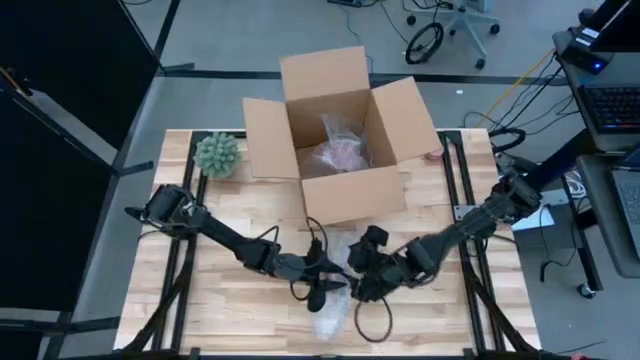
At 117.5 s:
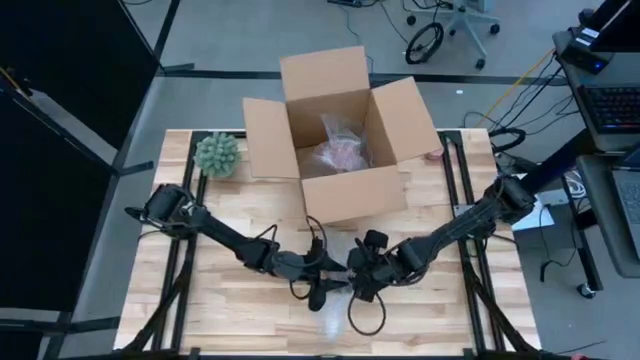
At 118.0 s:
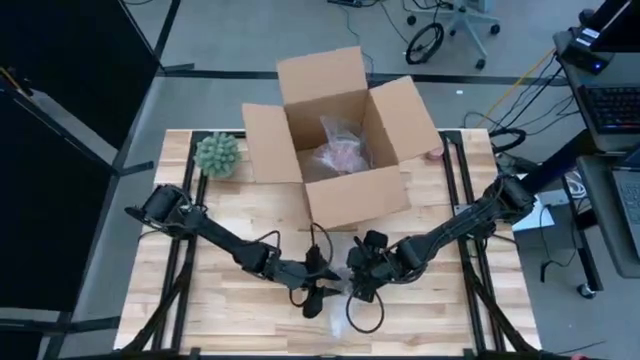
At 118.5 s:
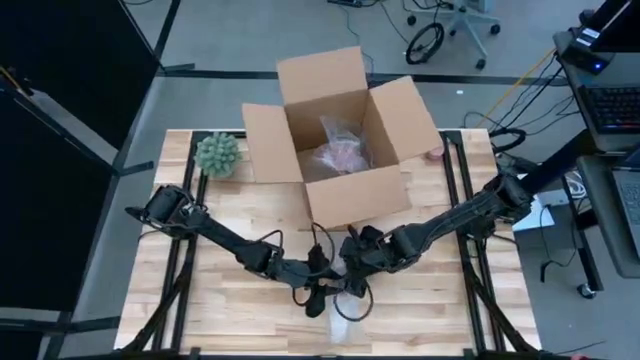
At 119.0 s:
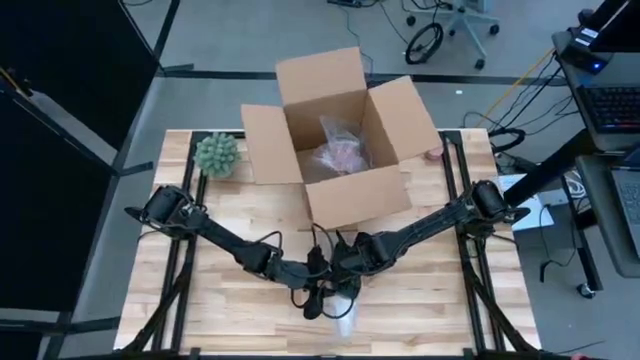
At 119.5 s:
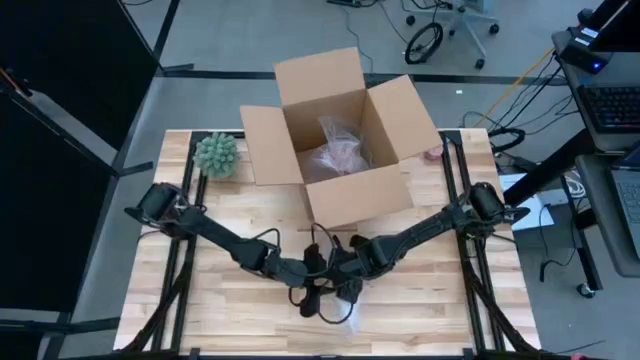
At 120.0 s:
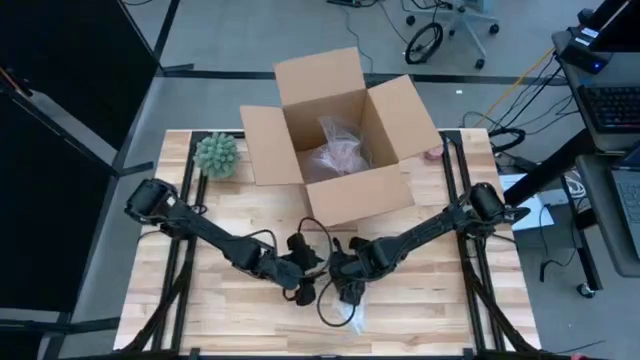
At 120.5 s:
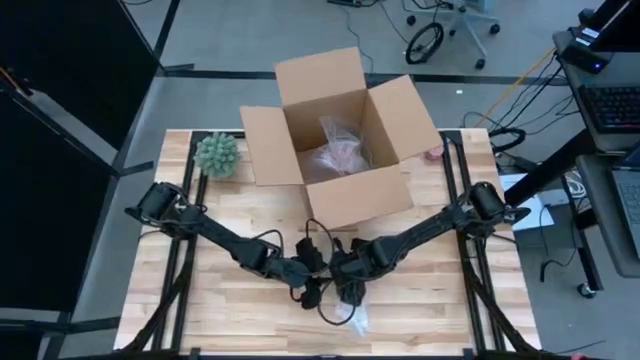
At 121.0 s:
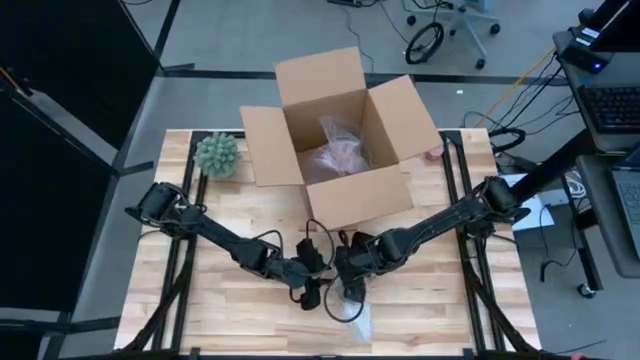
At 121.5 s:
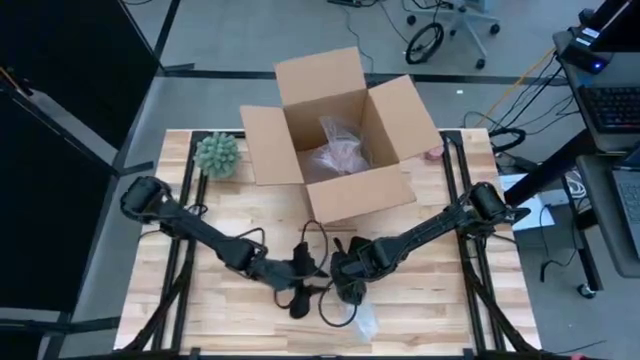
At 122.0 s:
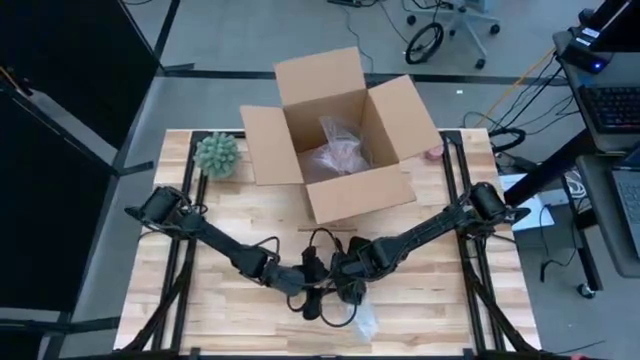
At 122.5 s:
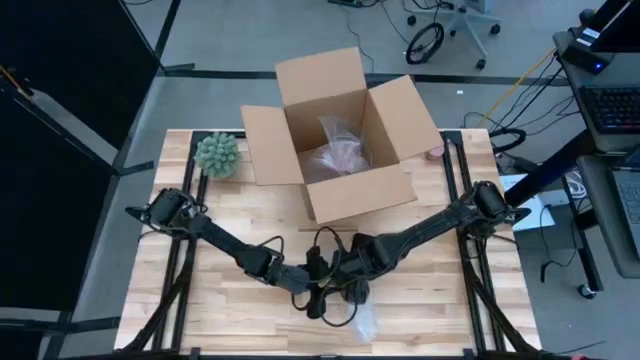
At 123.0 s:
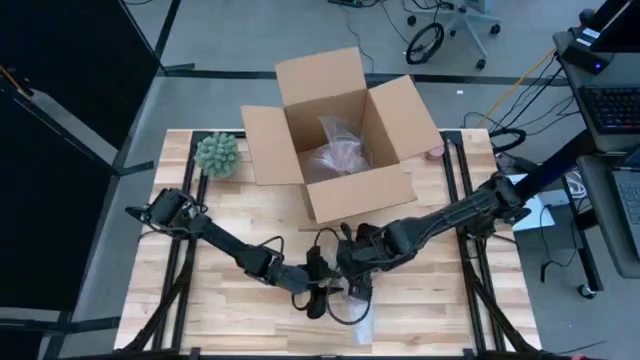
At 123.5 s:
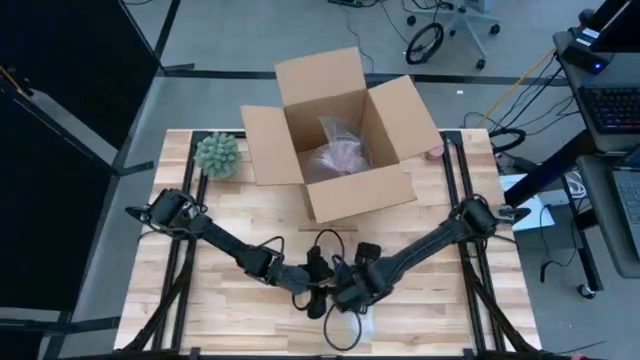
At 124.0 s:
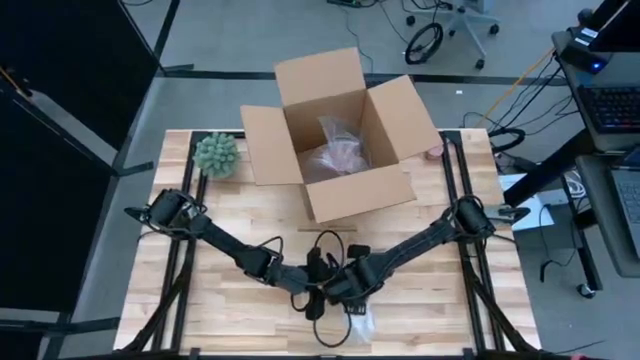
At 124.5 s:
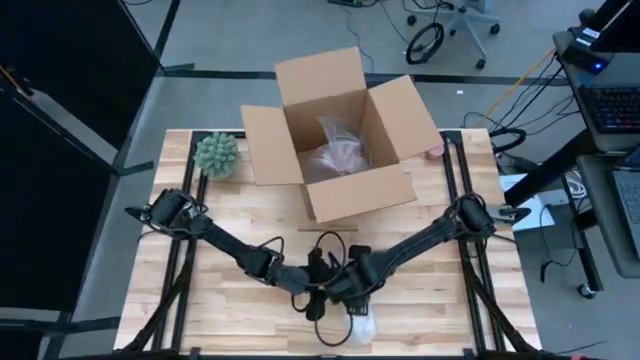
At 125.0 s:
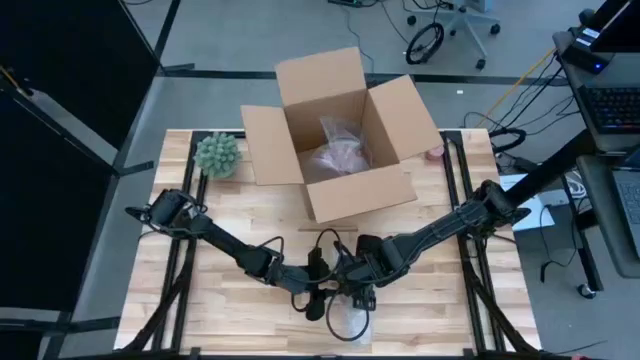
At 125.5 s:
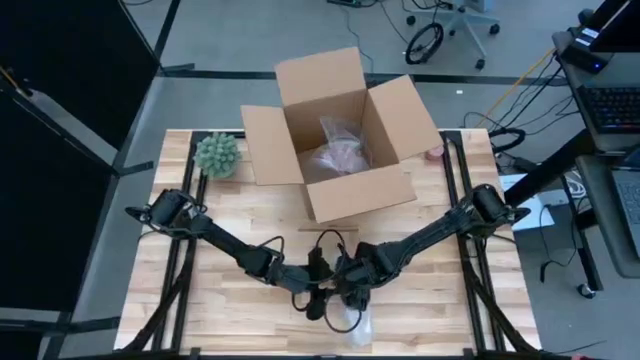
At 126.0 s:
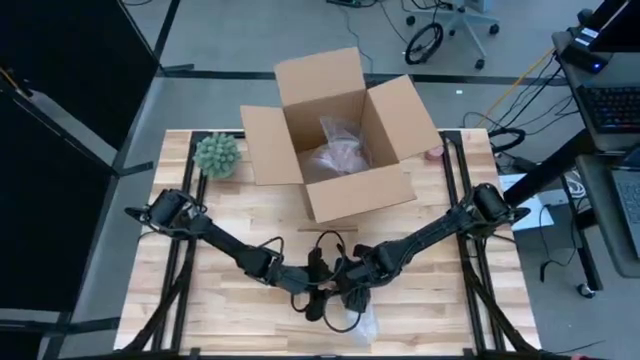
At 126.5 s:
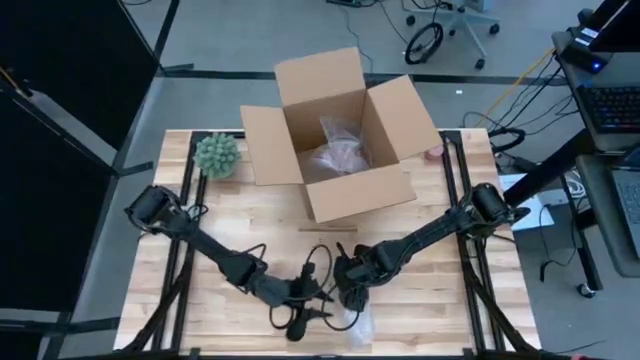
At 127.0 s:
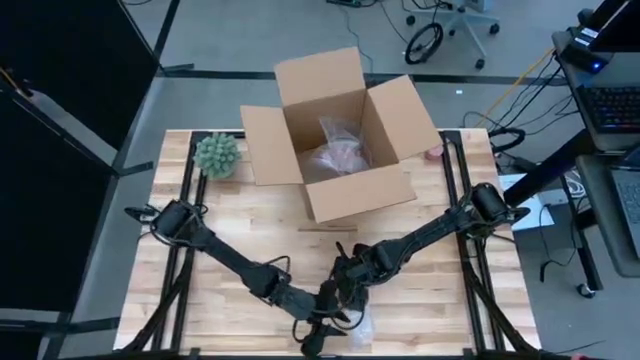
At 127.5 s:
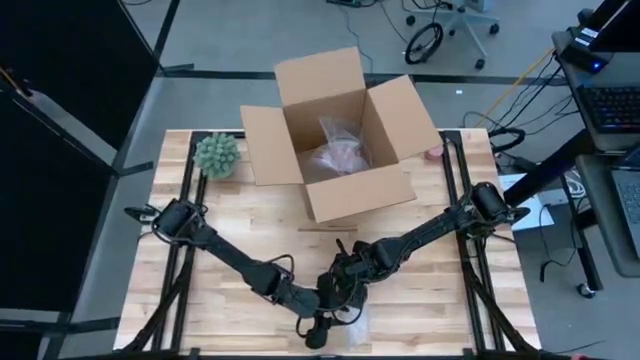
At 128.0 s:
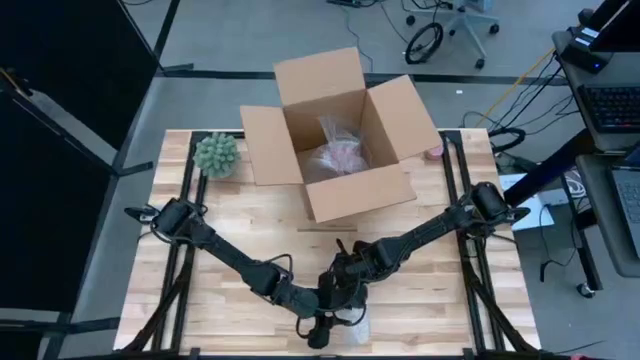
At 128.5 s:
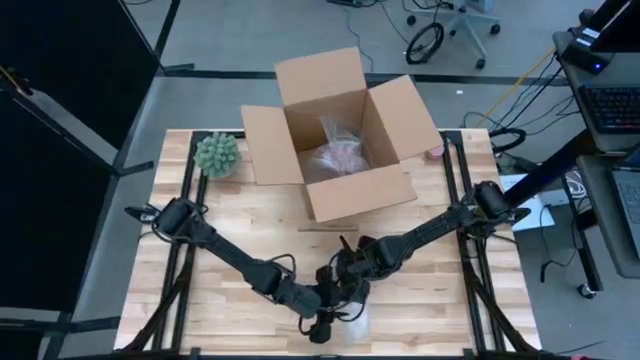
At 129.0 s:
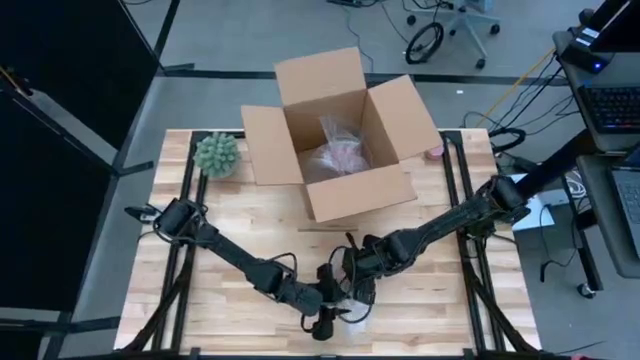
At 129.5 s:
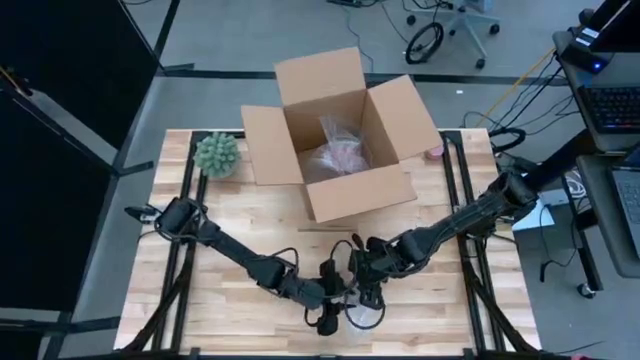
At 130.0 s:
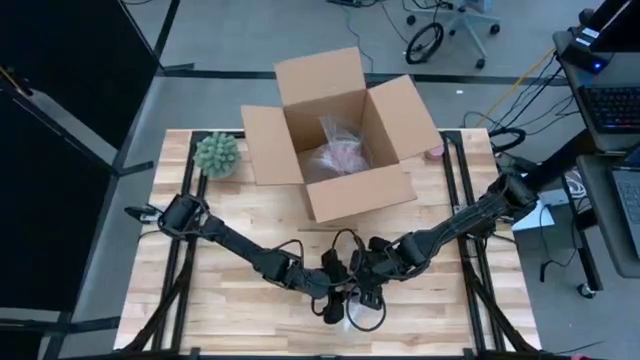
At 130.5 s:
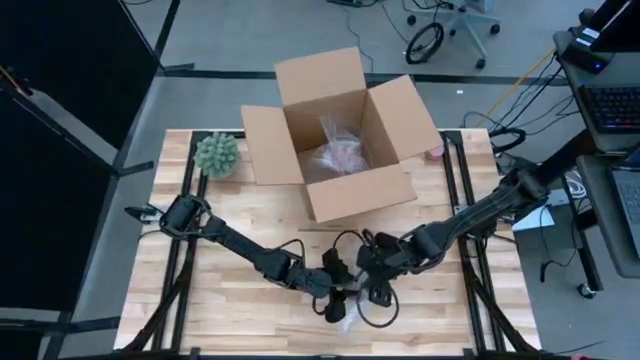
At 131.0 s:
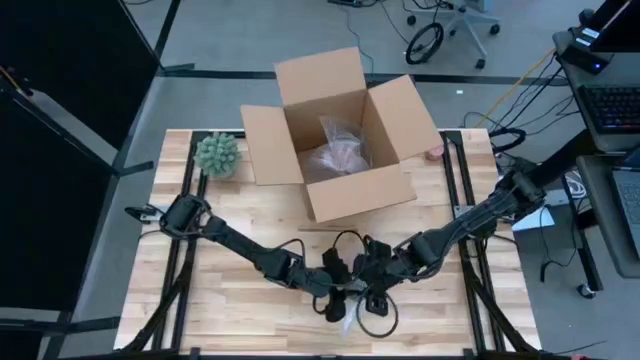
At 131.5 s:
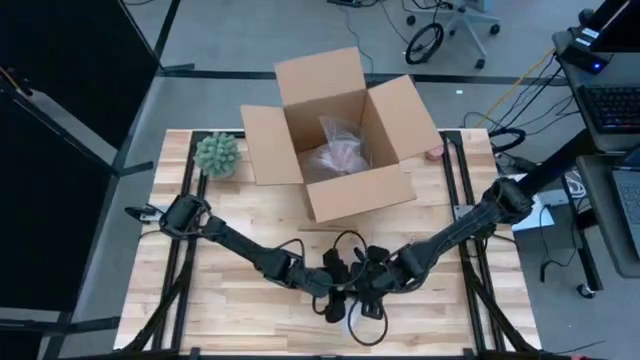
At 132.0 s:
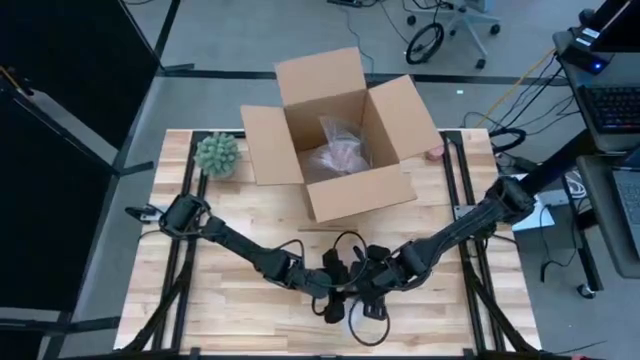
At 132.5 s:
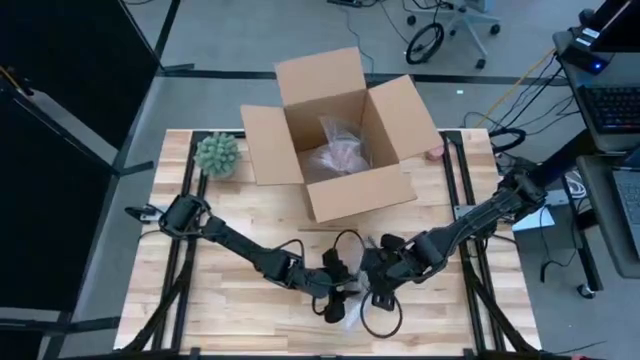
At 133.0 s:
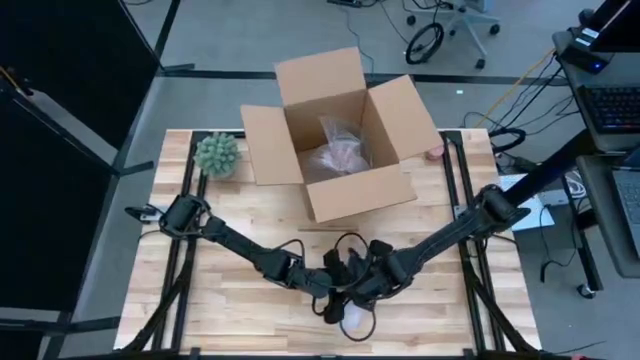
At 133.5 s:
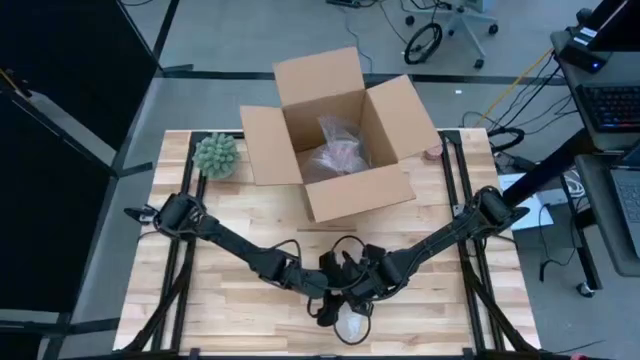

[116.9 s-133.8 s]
Task: wrap mug
Wrap the orange mug with the left bubble wrap

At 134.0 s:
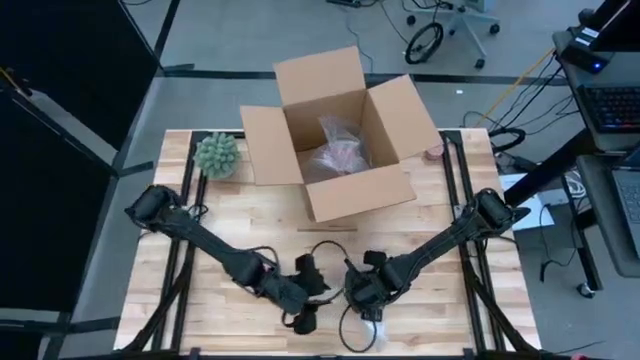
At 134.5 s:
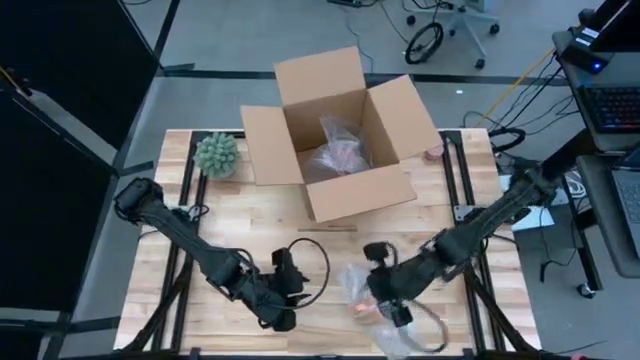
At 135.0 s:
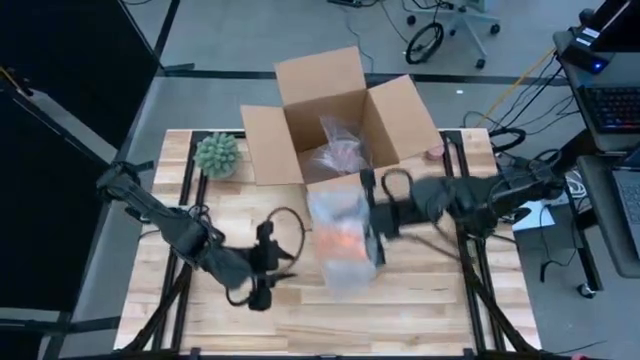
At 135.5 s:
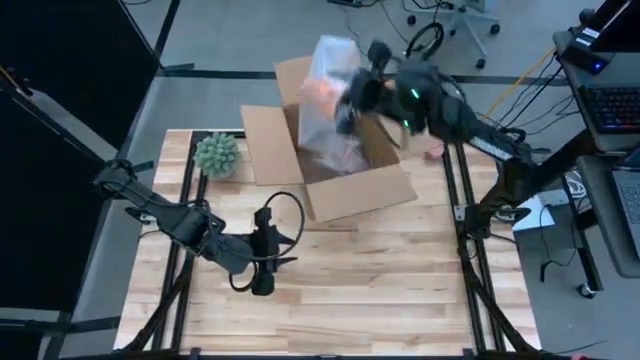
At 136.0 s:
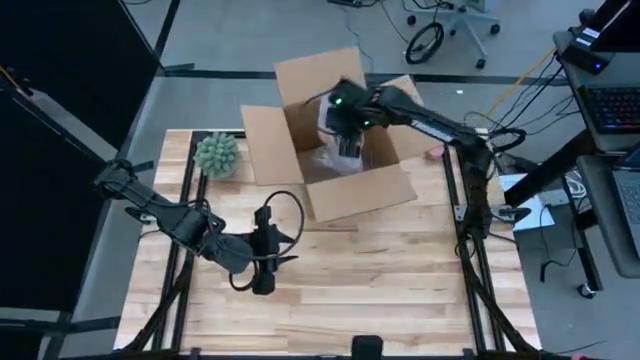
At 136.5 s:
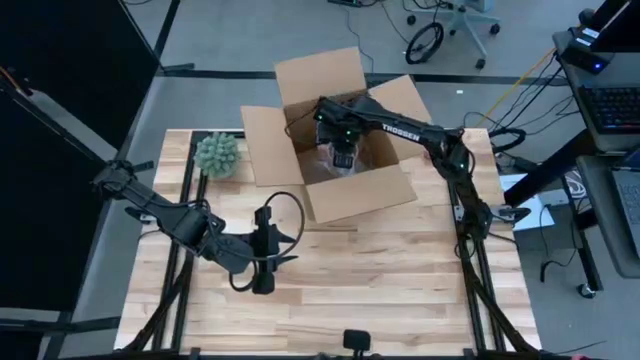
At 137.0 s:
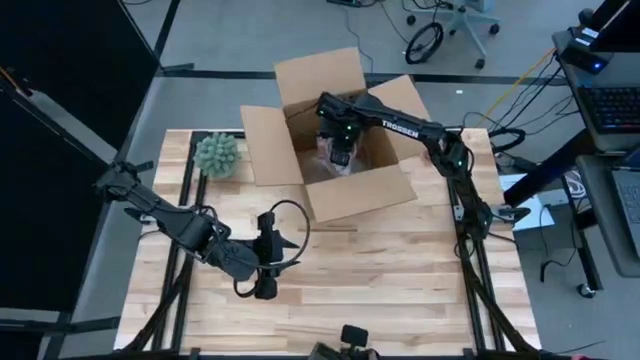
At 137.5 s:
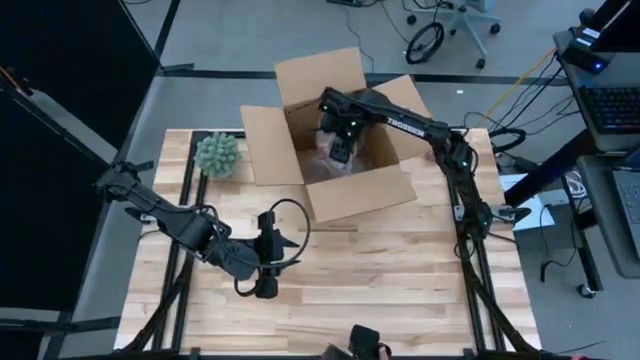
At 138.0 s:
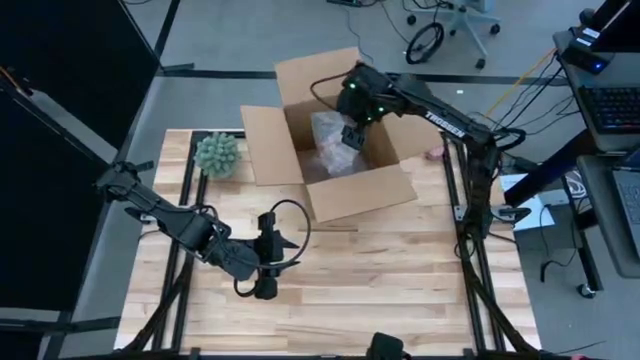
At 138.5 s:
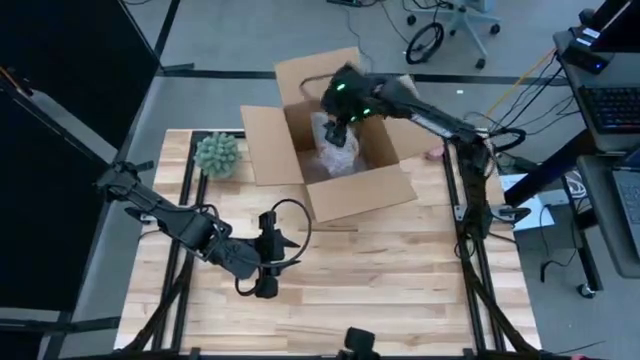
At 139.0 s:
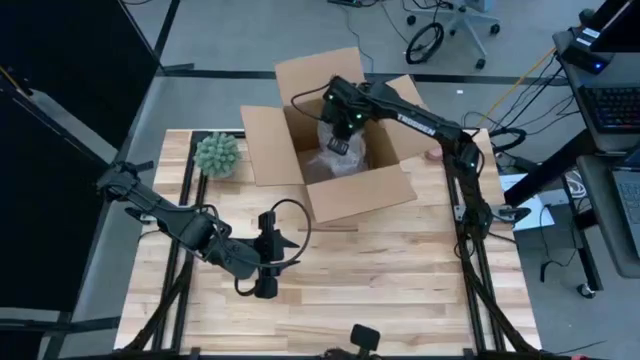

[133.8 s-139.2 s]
Put the wrapped orange mug into the box

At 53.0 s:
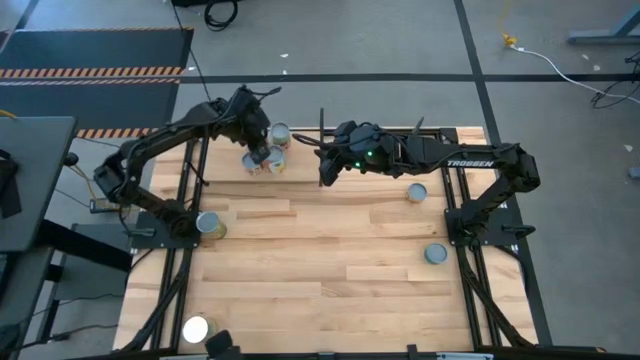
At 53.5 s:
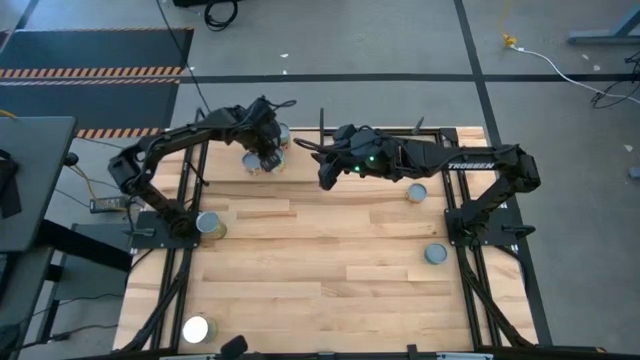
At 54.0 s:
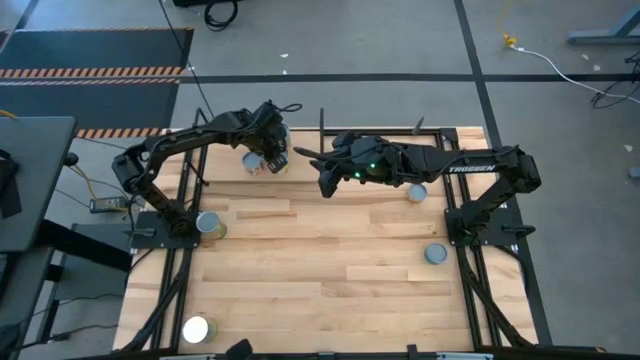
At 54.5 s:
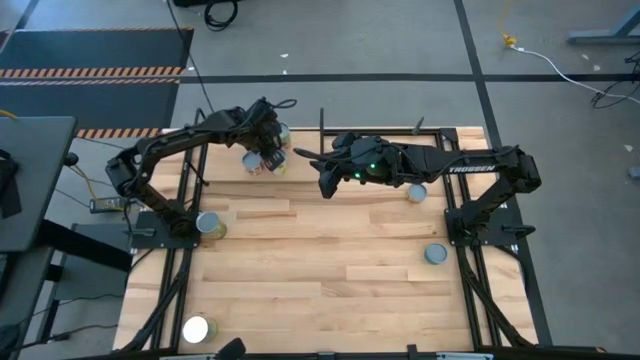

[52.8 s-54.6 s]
Task: Pick and place cans onto a shelf
Adjust the canned mixed fruits on the shelf
